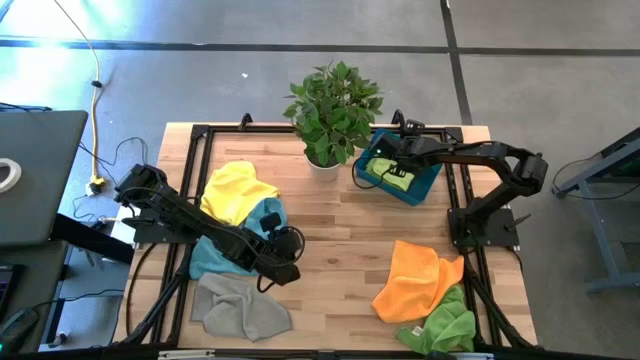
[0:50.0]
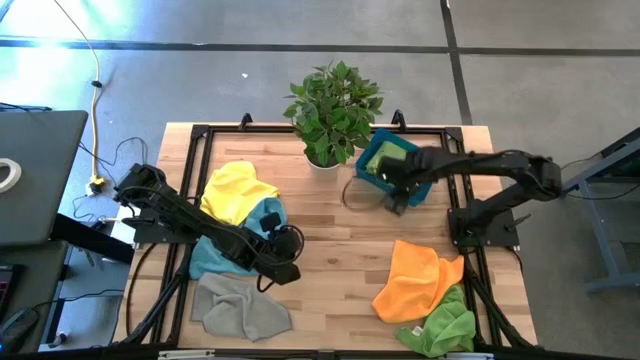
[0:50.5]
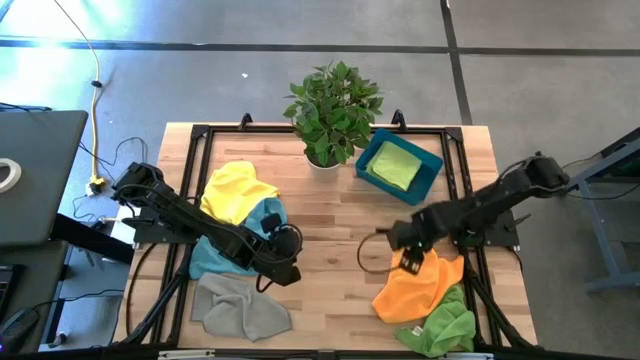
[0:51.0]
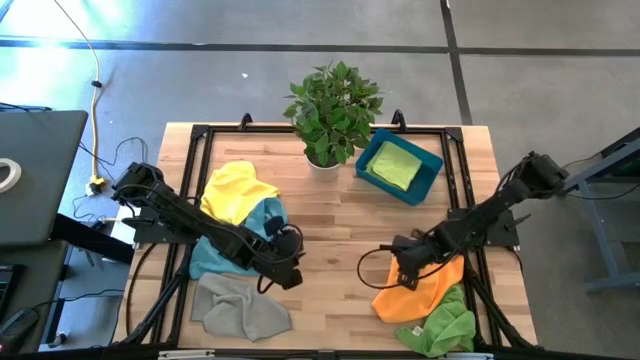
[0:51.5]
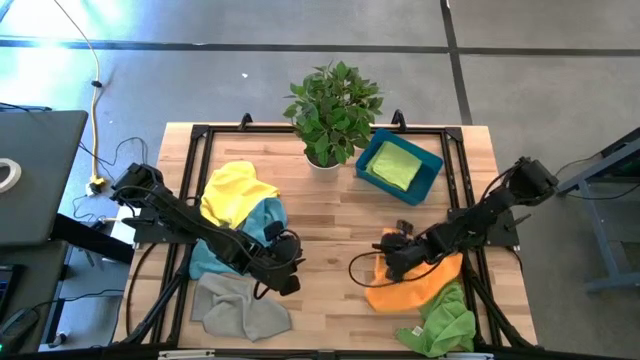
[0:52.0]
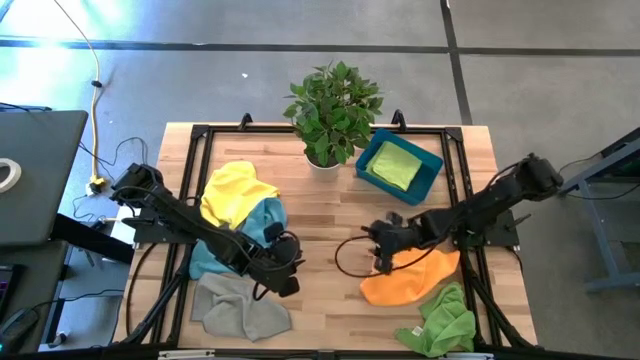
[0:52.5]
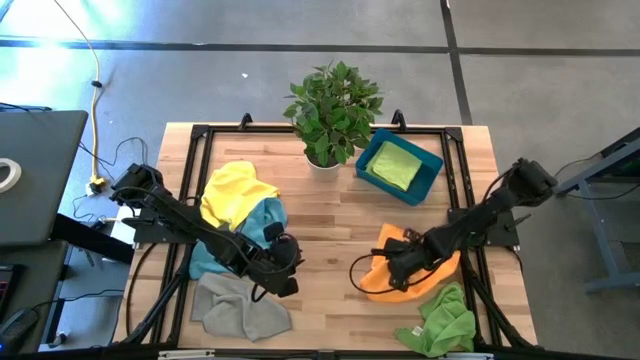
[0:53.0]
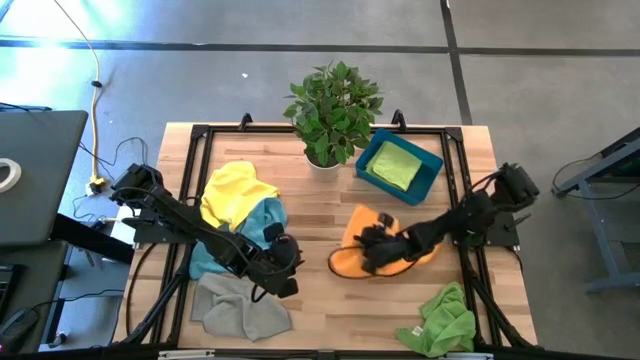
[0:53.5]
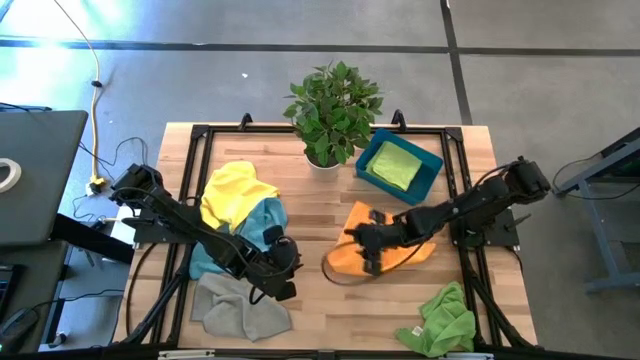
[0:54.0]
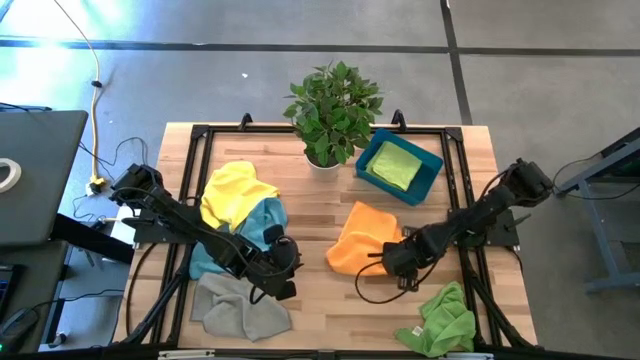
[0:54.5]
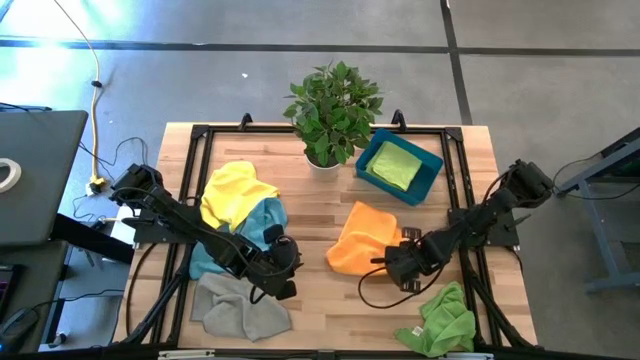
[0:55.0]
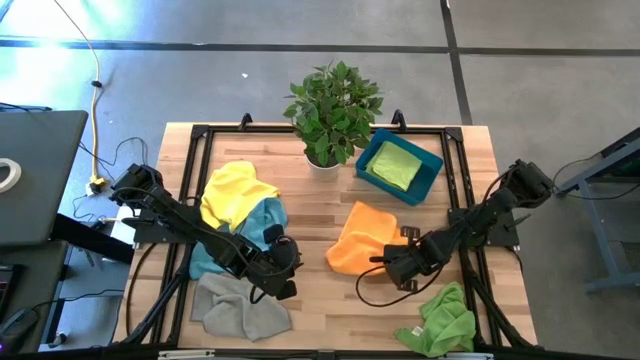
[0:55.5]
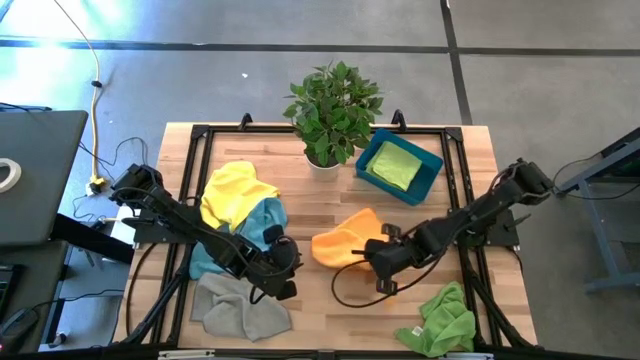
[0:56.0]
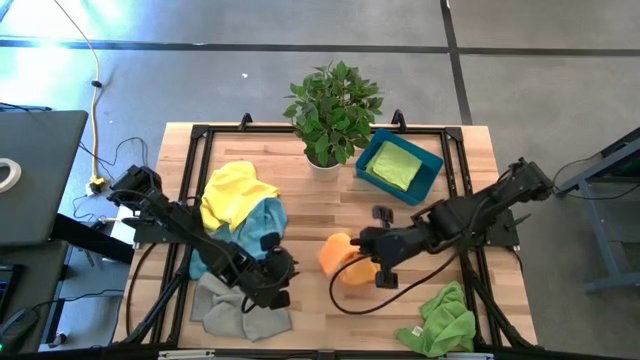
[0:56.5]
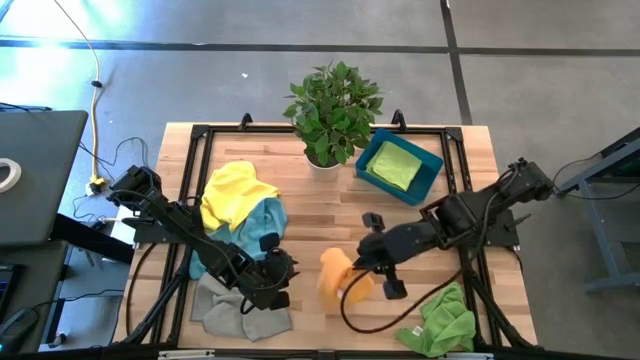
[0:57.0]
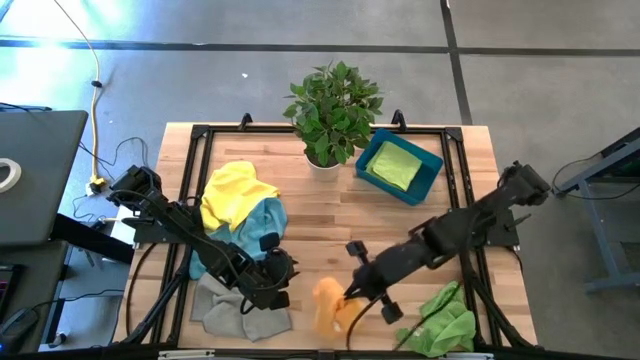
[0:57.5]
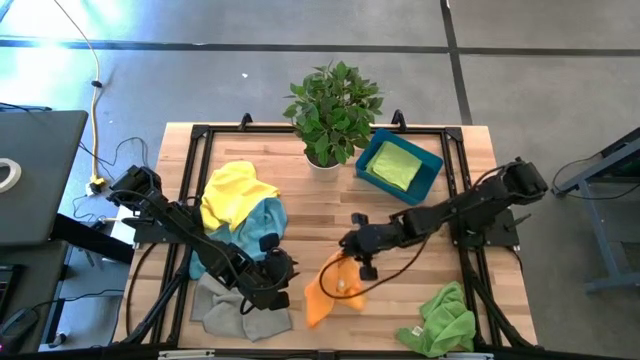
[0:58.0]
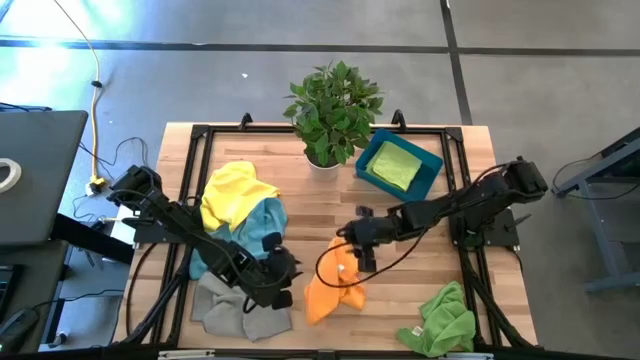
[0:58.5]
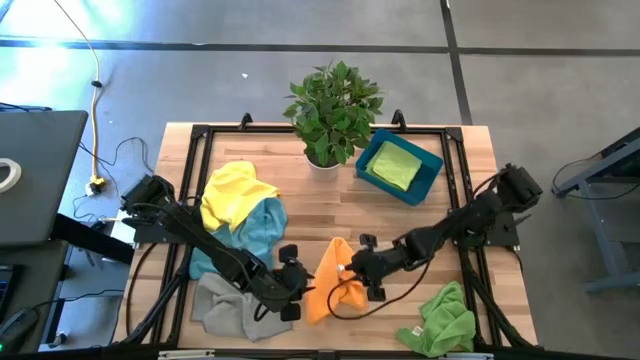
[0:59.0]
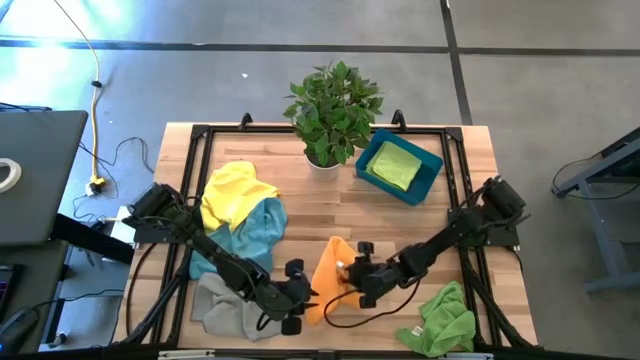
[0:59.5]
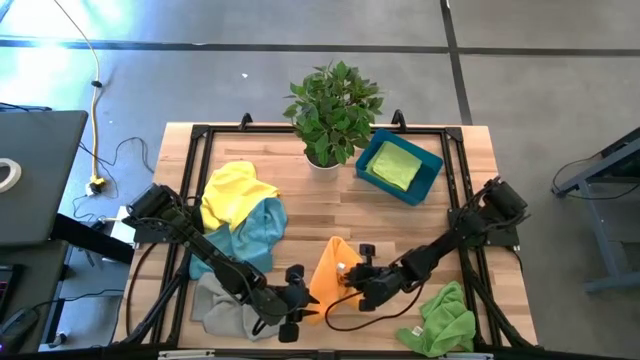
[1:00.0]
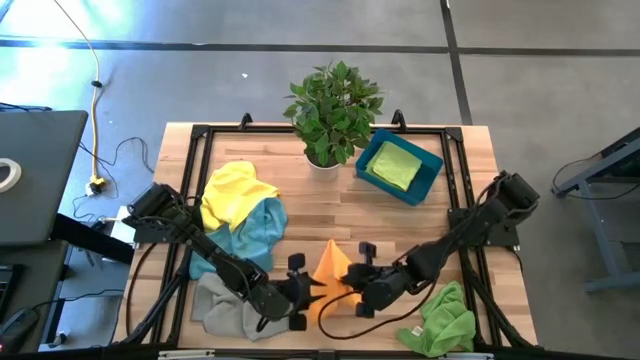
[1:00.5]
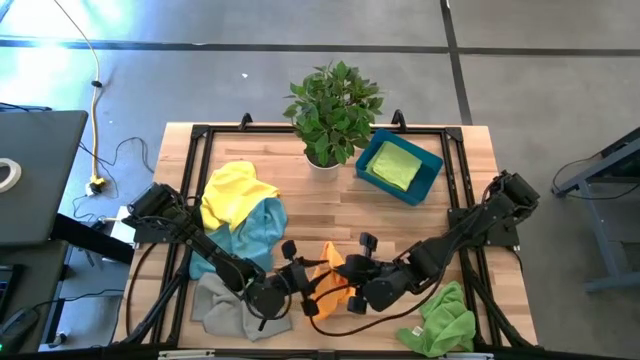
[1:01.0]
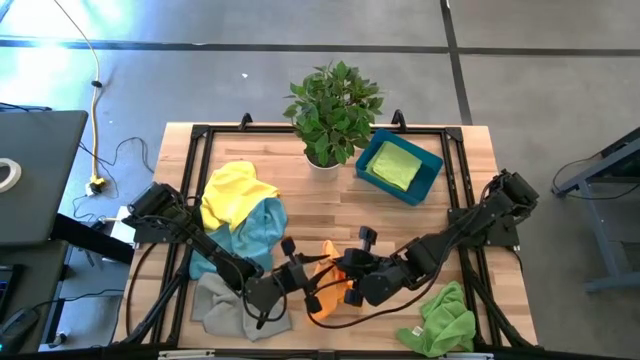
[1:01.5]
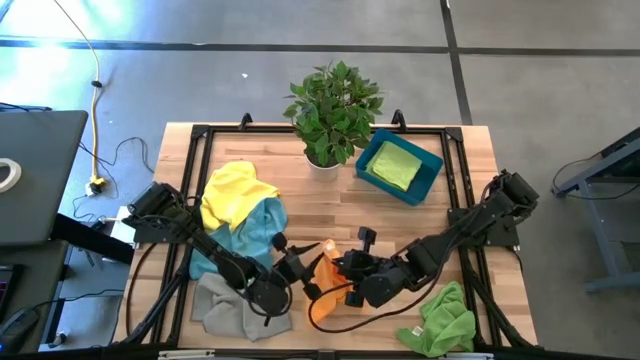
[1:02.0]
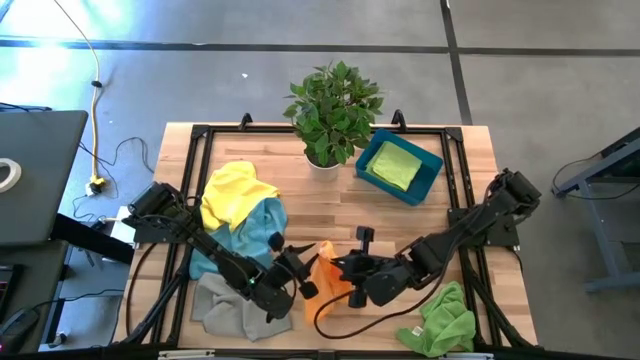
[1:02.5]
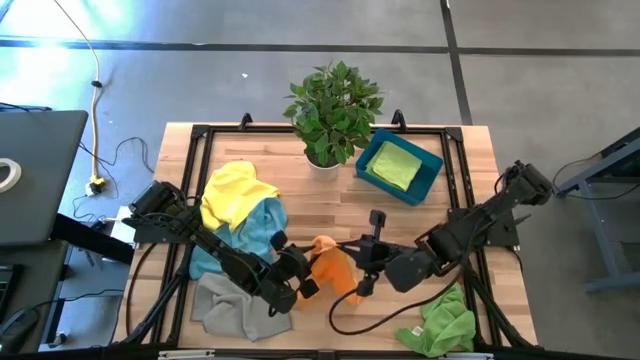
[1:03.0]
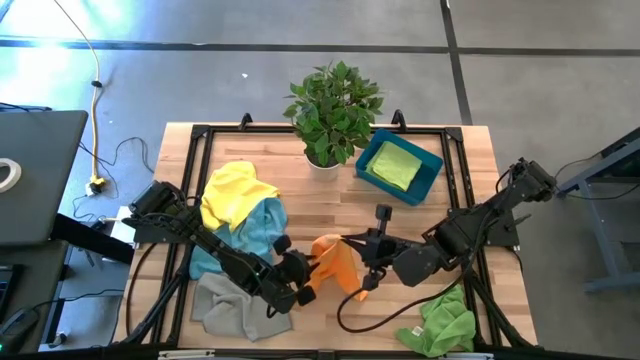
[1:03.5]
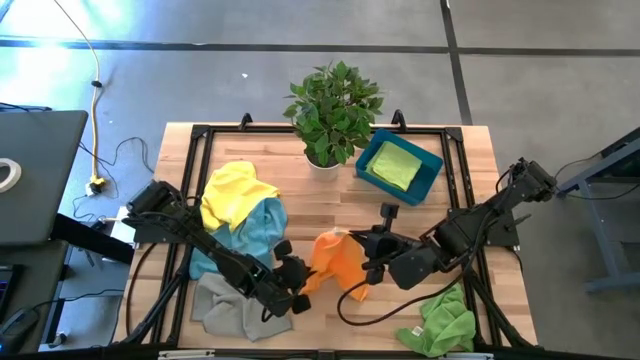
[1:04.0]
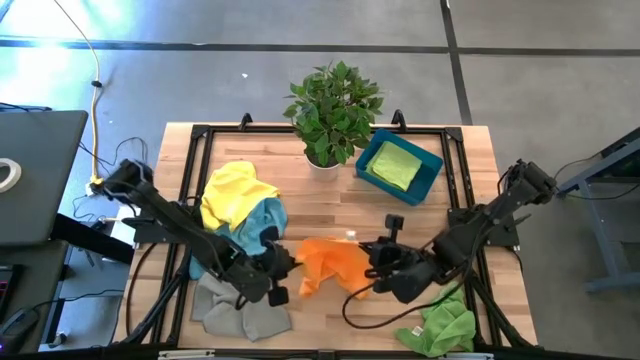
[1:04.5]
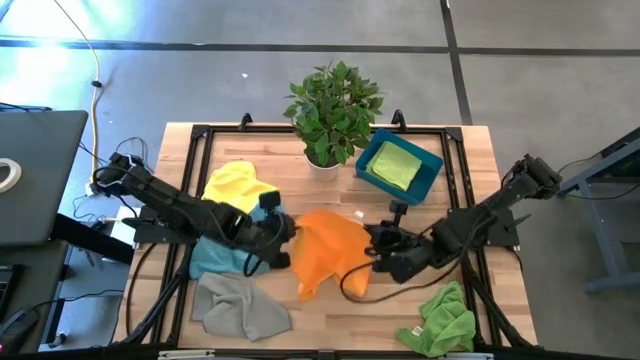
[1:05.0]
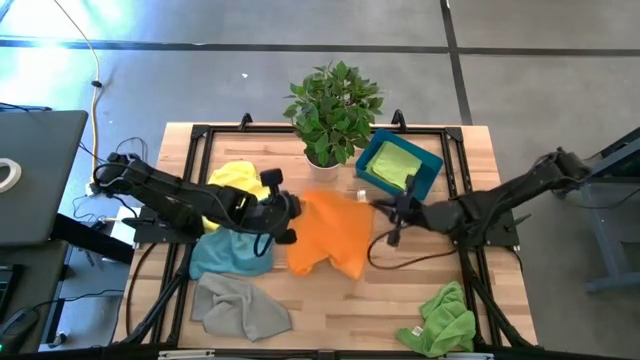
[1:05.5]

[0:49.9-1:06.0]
Task: Fold microfiber towels
Fold the orange towel

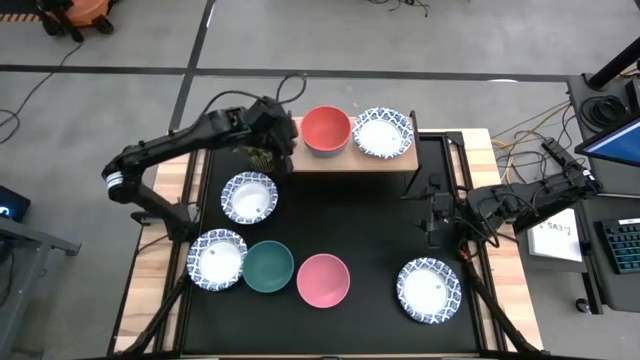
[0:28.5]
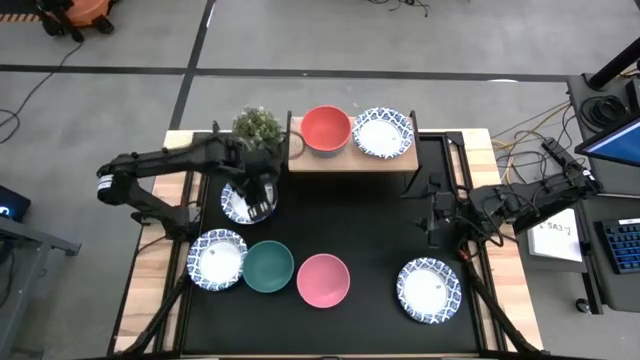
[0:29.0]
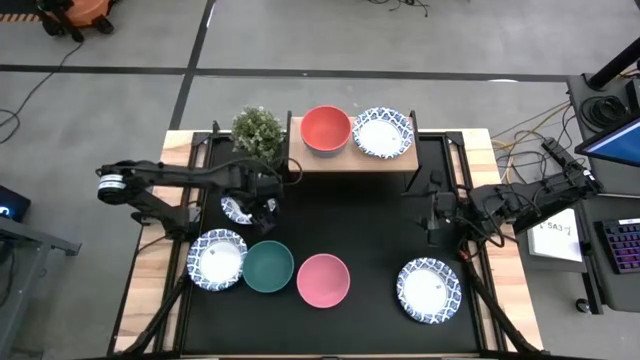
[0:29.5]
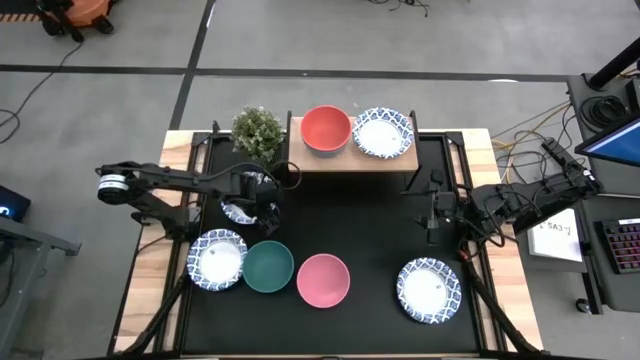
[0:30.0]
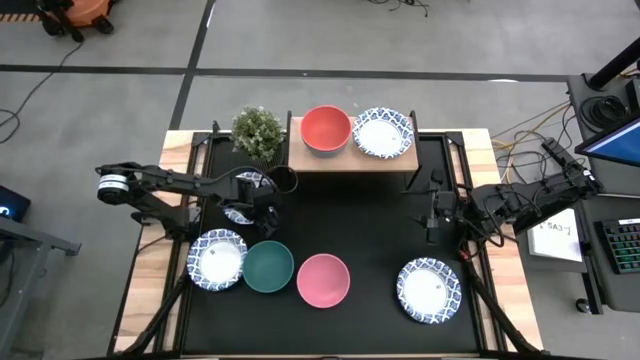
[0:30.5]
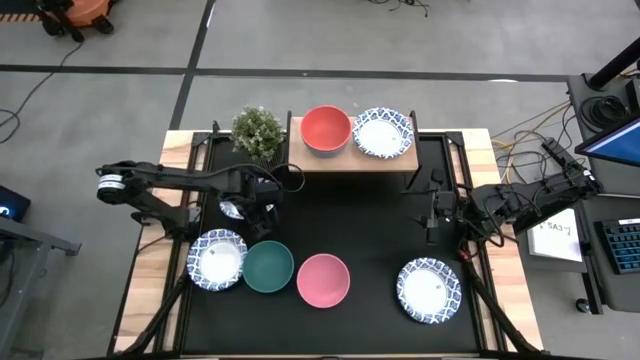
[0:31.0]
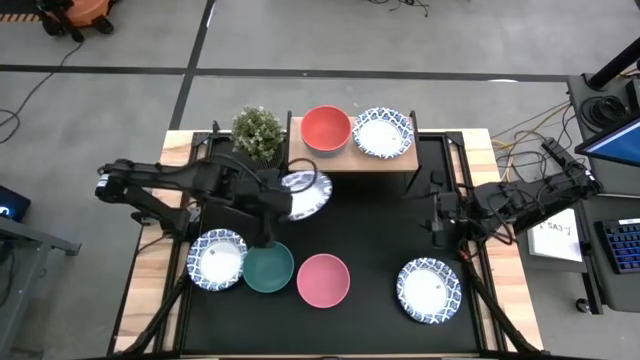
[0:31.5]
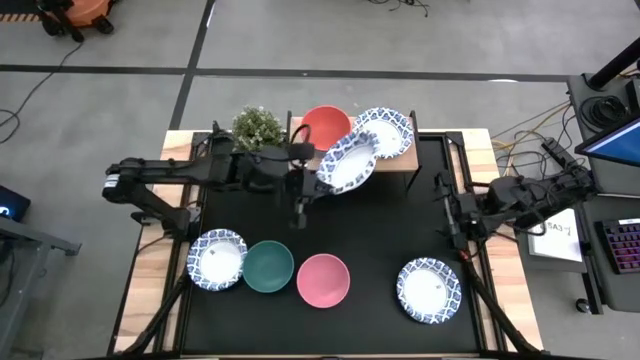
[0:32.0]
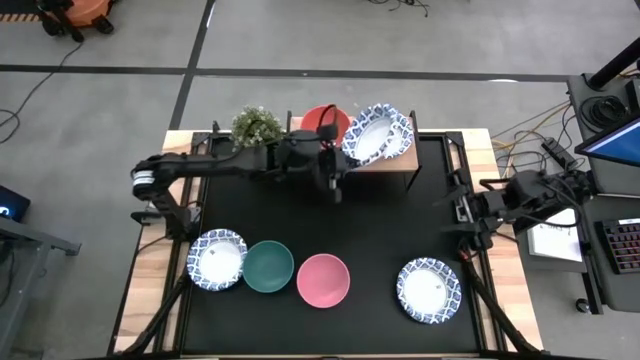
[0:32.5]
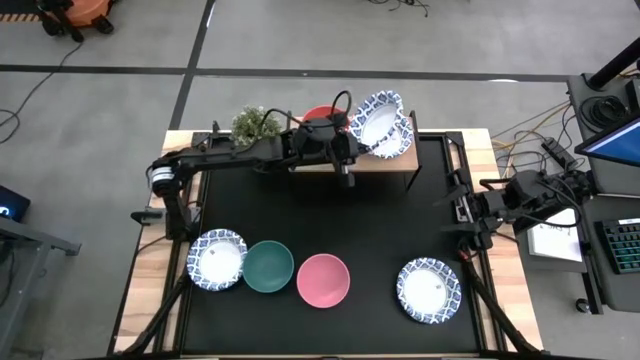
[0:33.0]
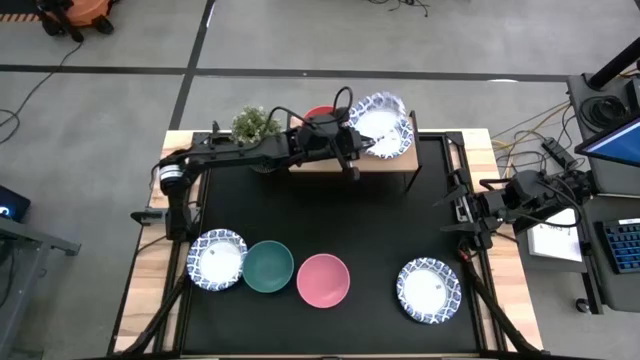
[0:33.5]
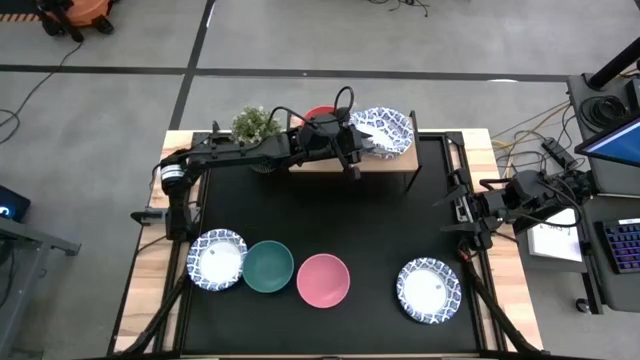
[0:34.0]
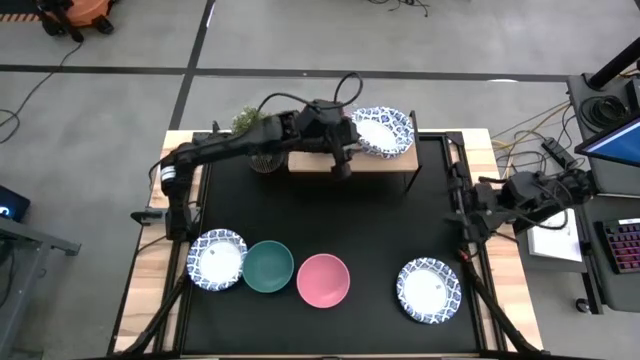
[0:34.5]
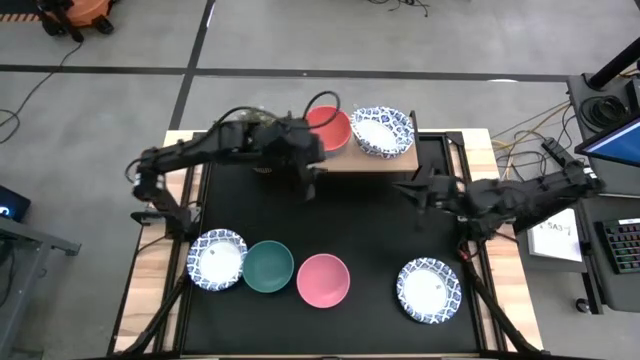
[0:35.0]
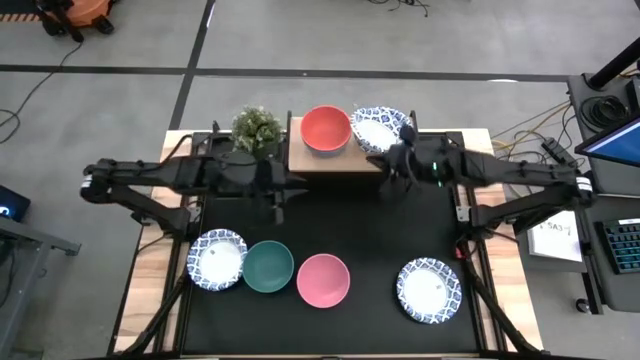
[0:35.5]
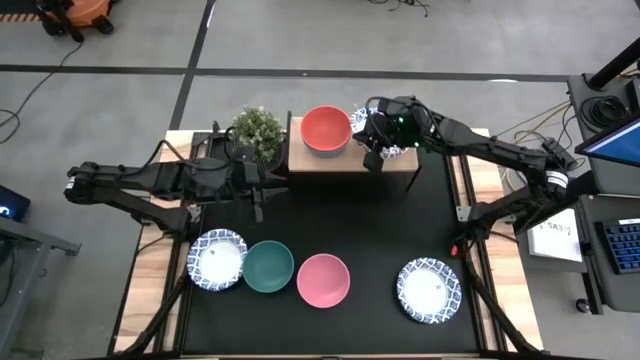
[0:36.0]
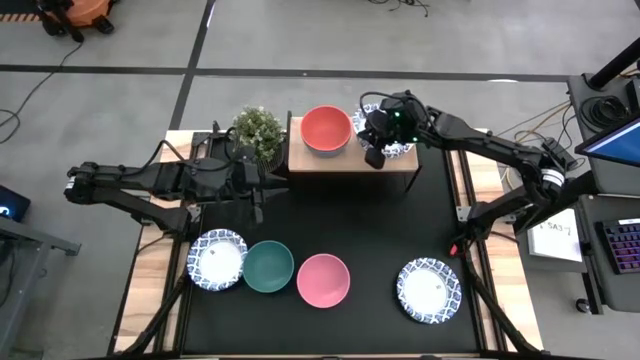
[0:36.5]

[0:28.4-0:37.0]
Task: Place and stack bowls onto a shelf
Stack the top left white patterned bowl on top of the white patterned bowl
